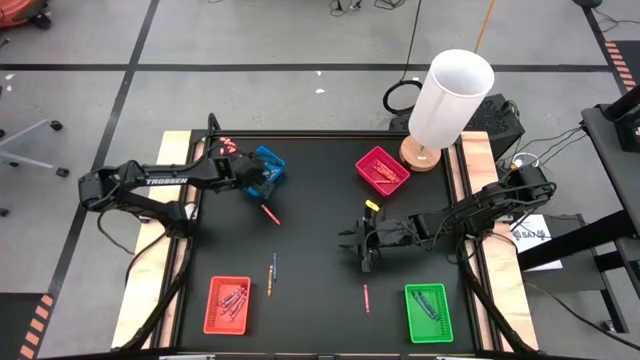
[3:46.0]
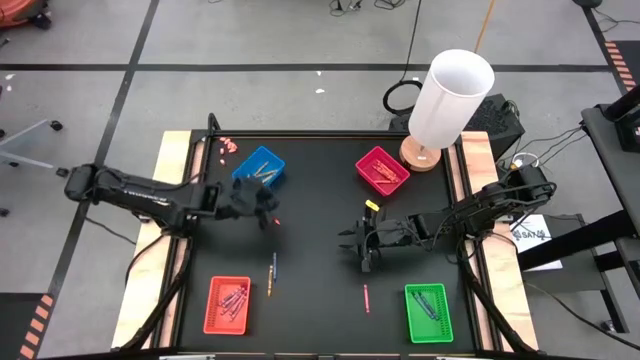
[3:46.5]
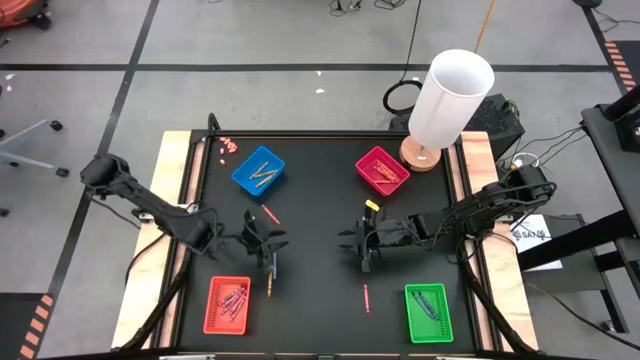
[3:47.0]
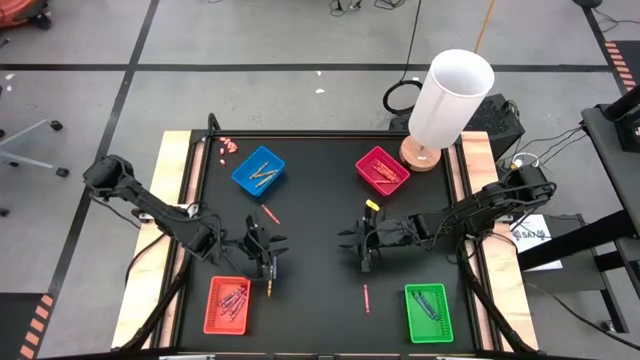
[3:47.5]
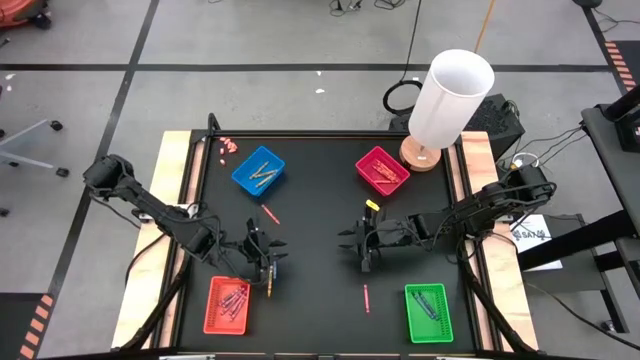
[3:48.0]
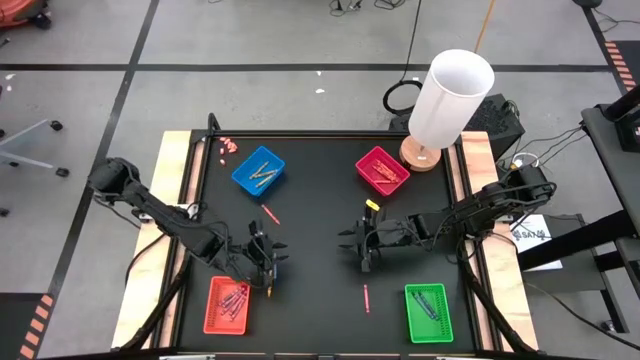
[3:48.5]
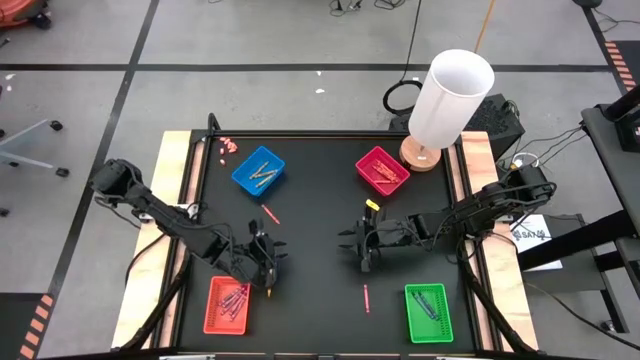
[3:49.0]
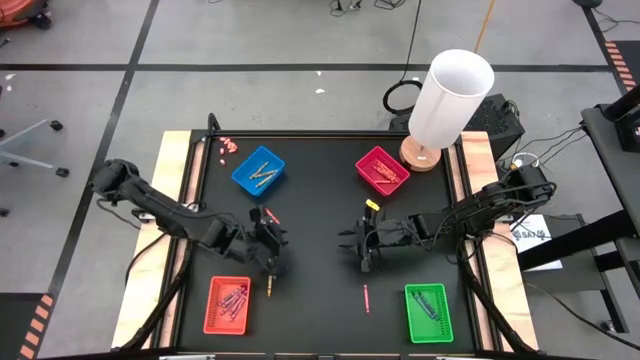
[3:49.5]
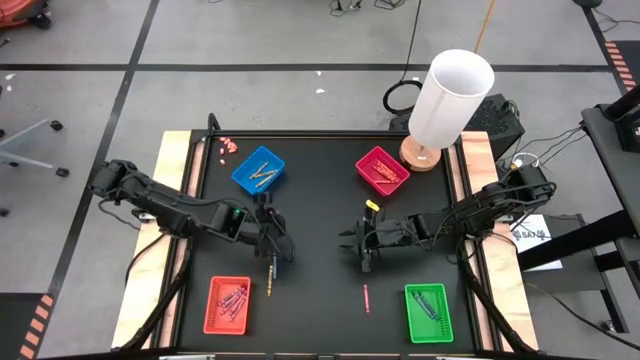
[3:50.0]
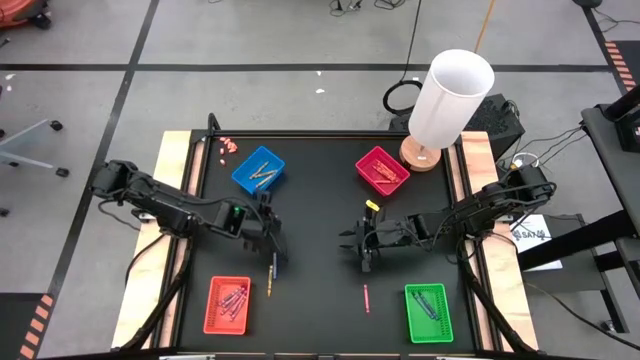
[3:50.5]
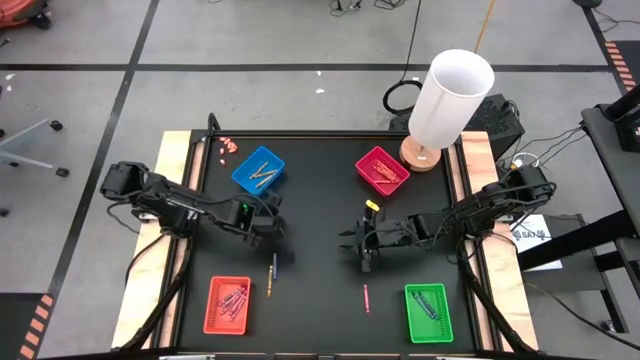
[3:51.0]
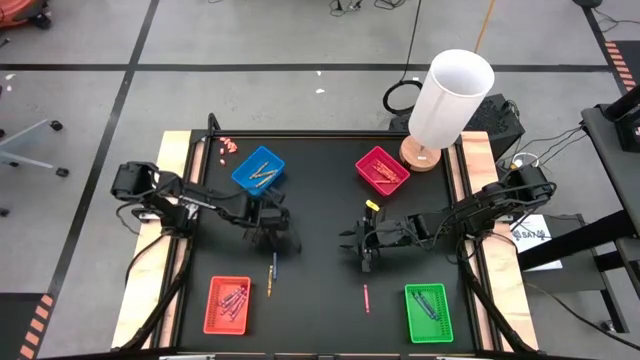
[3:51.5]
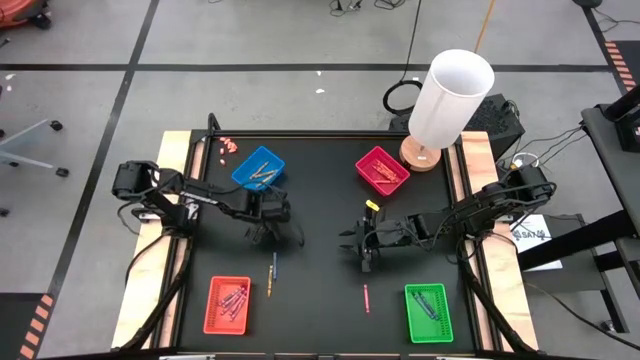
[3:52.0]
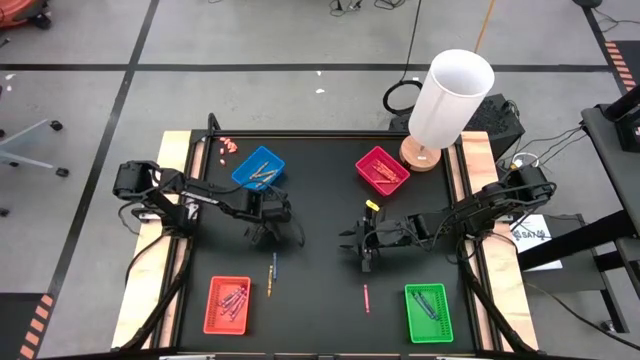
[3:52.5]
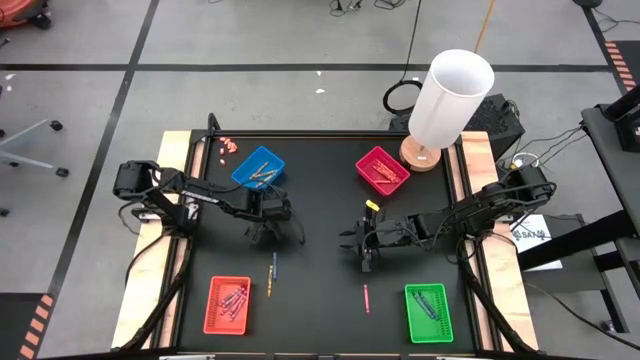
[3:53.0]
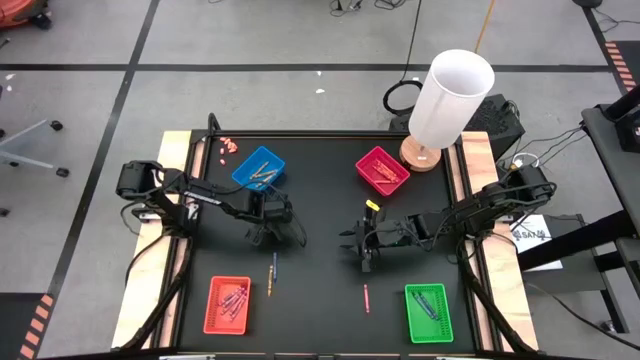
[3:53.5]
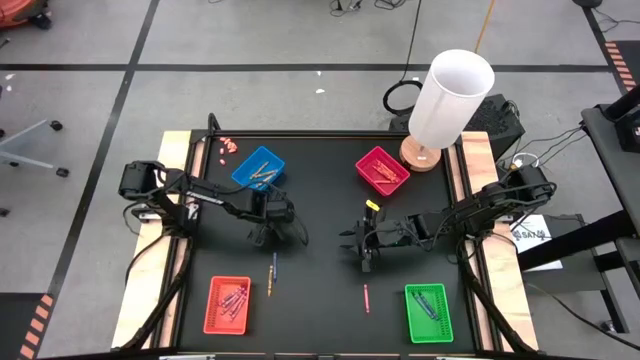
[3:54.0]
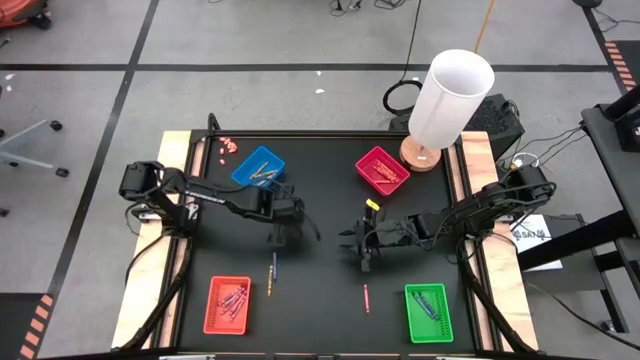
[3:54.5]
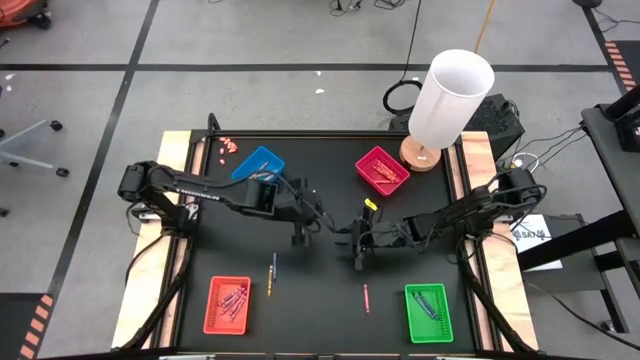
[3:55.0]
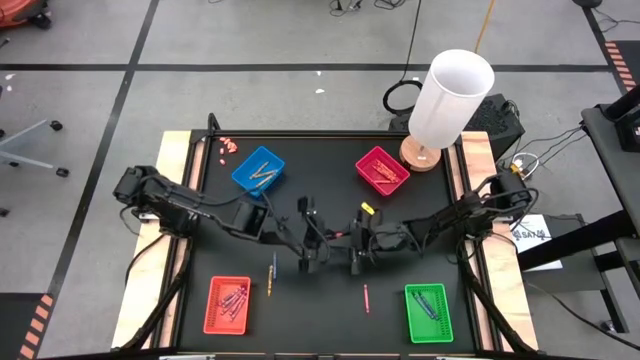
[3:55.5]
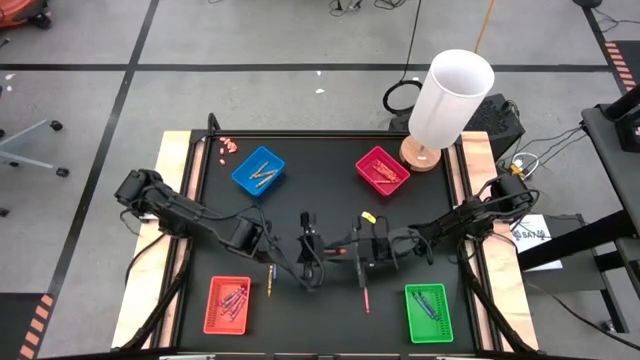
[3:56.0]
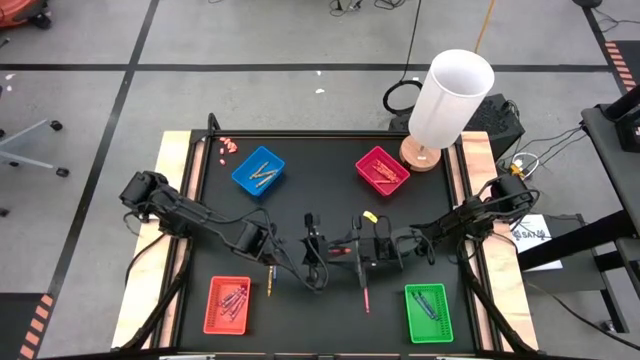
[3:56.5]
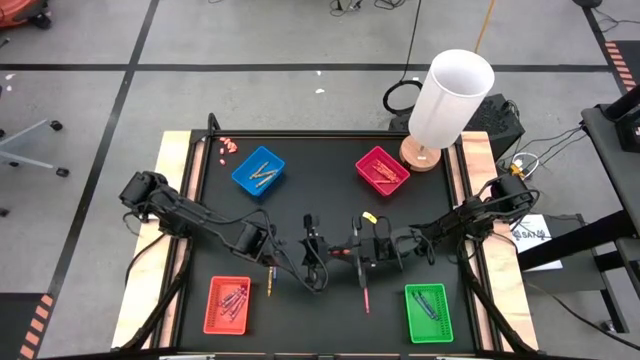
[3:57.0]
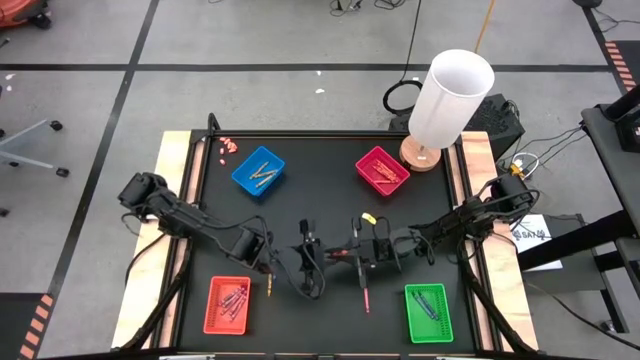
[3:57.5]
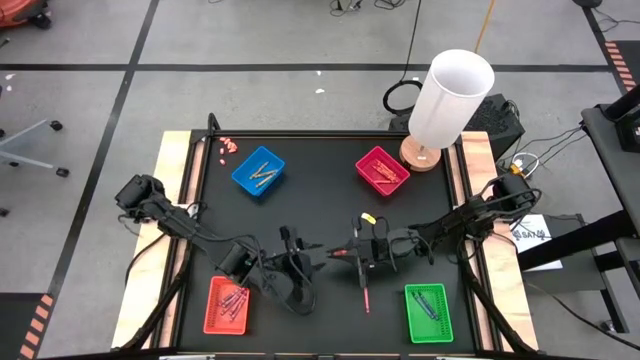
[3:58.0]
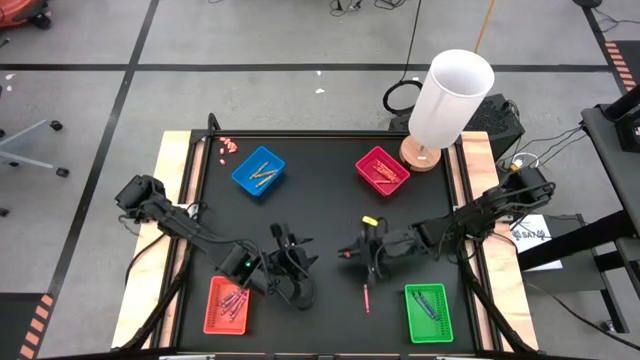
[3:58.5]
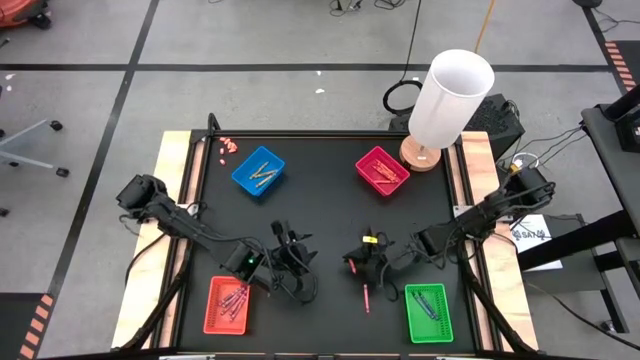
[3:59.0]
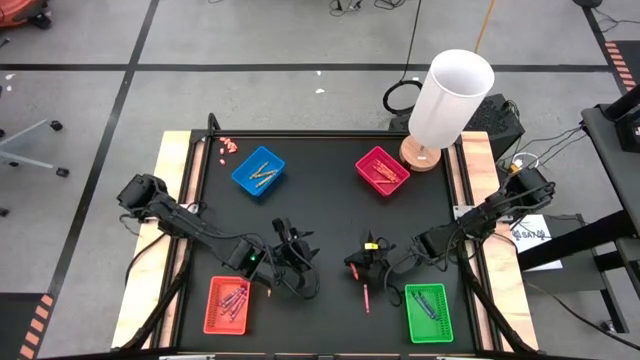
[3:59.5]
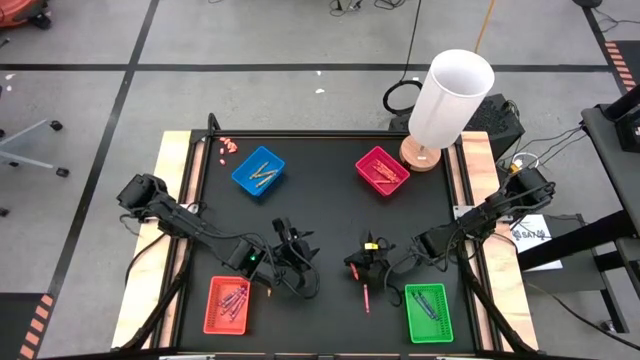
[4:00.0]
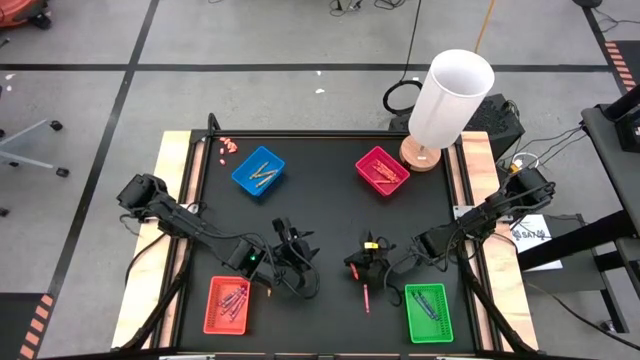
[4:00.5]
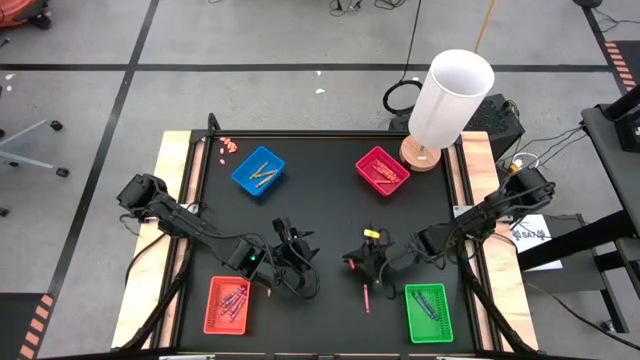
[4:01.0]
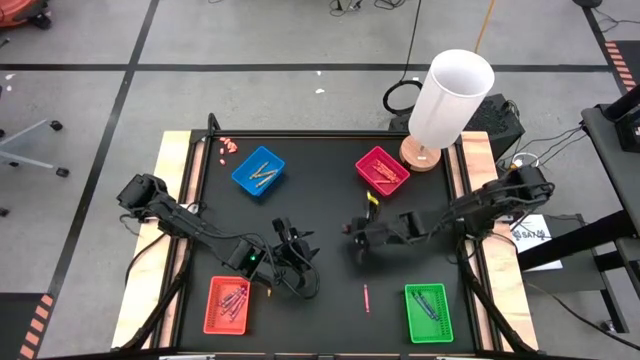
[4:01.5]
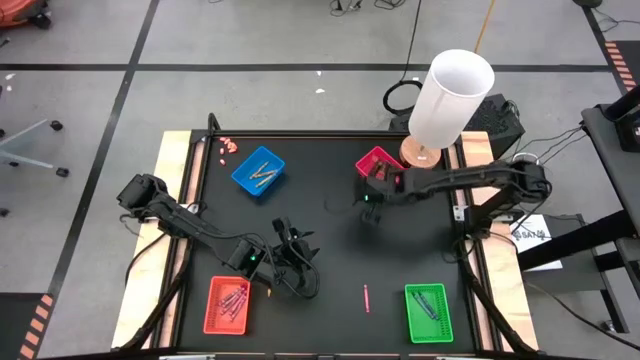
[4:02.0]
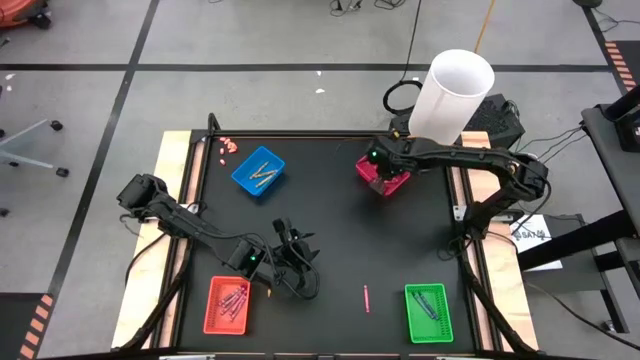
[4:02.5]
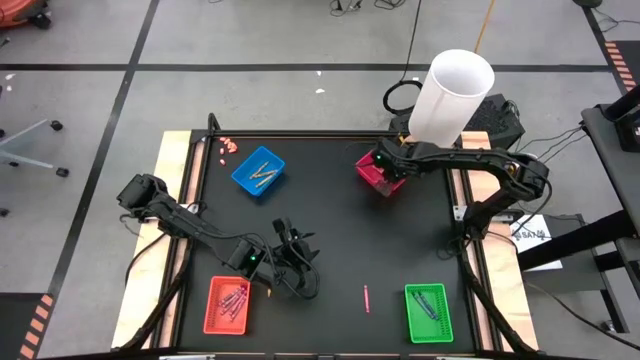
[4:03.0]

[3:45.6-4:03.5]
Task: Sort crayons
Put the orange crayon into the red bin

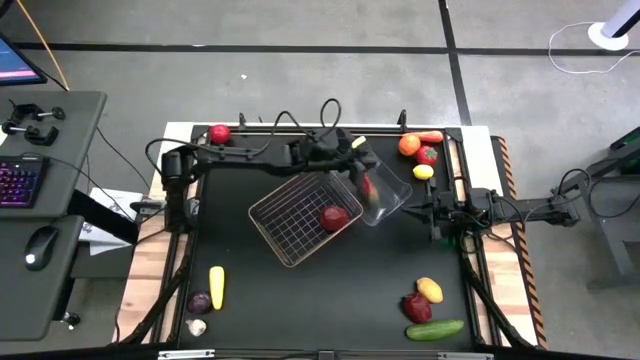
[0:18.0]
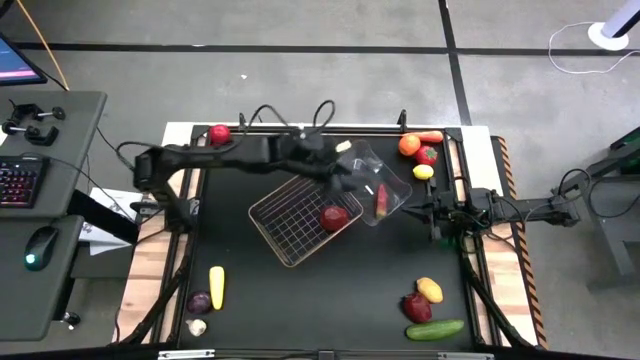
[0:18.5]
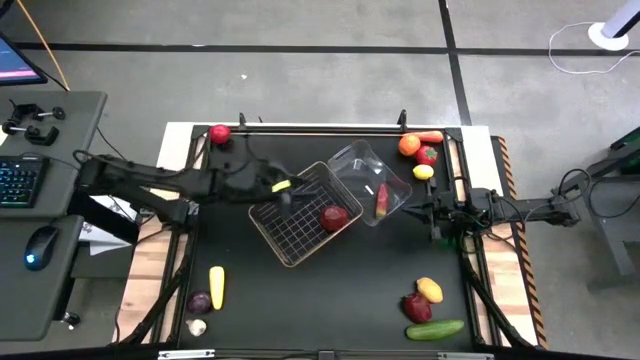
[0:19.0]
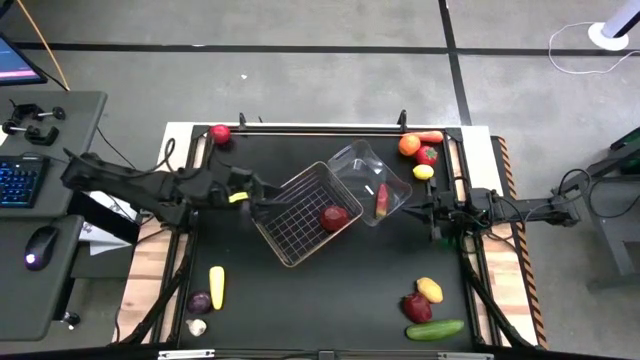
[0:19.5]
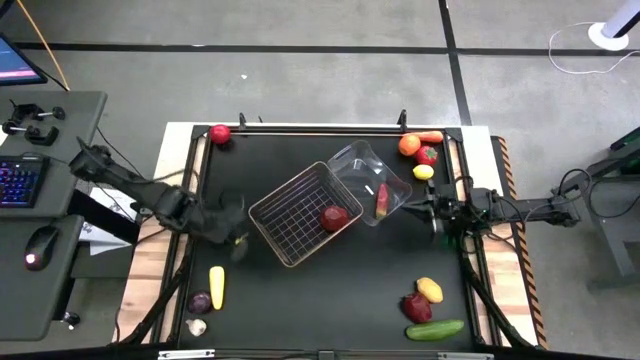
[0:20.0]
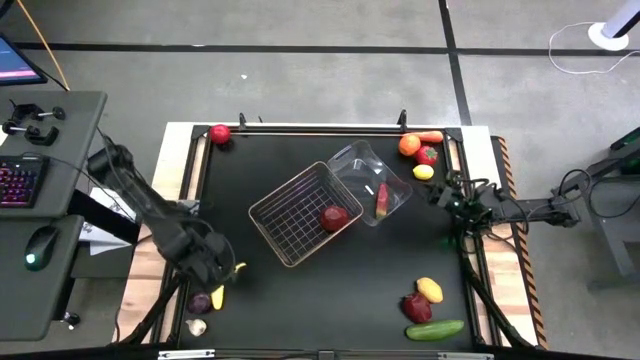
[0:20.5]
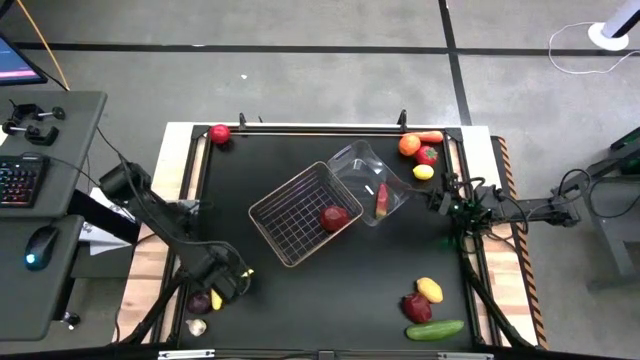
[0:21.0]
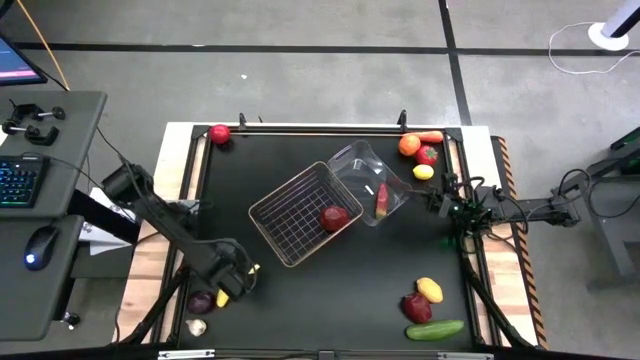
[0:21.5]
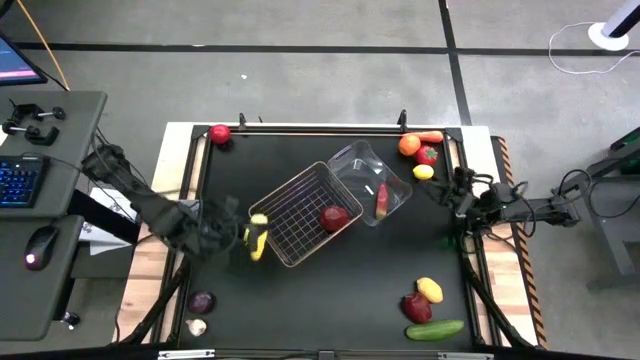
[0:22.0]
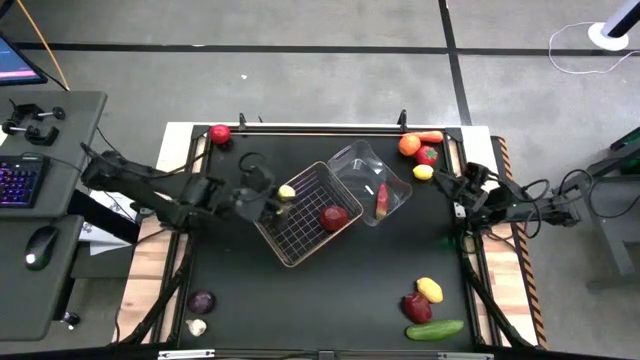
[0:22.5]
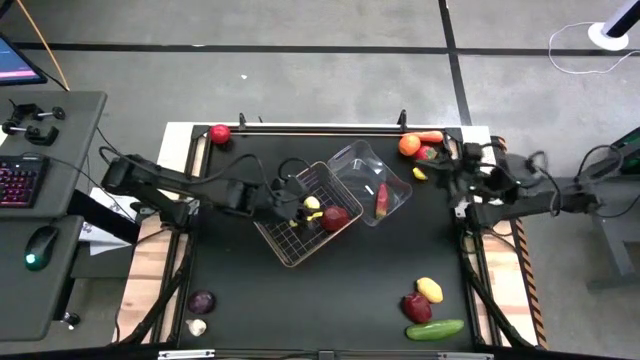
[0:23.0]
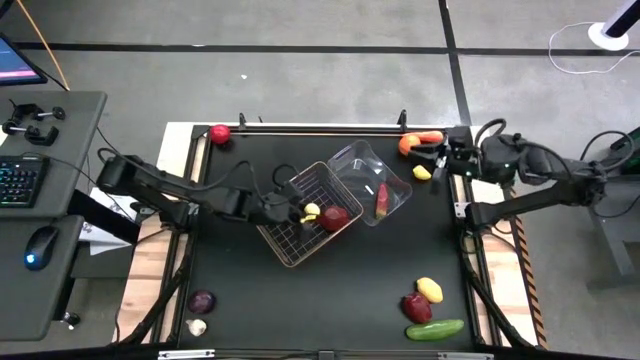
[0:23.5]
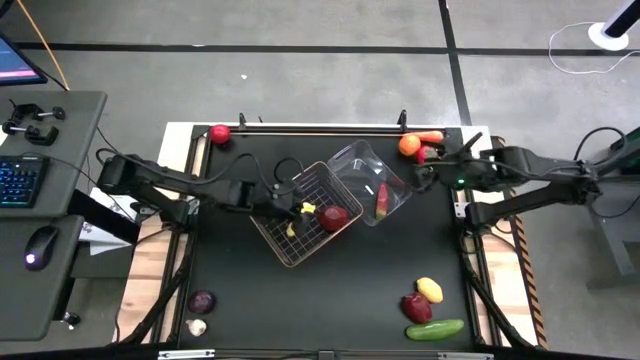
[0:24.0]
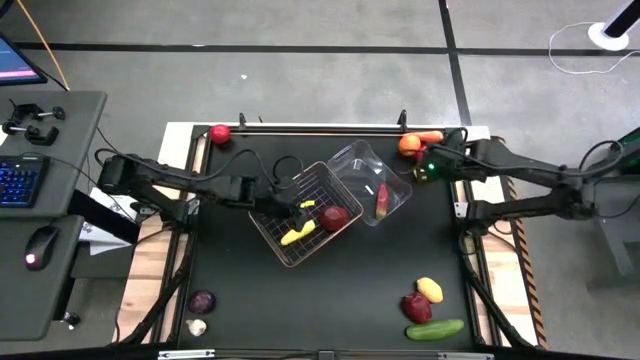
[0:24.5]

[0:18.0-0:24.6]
Task: Sort produce into baskets
Put the corn into the gold wire basket
